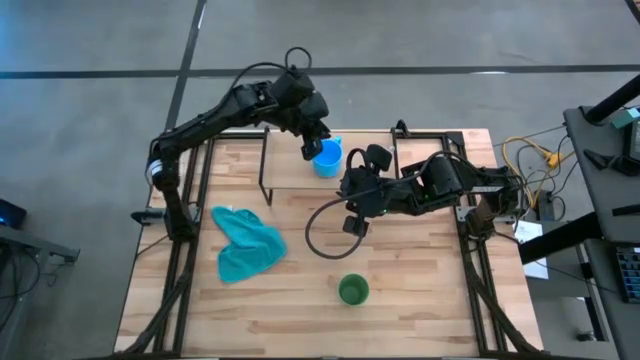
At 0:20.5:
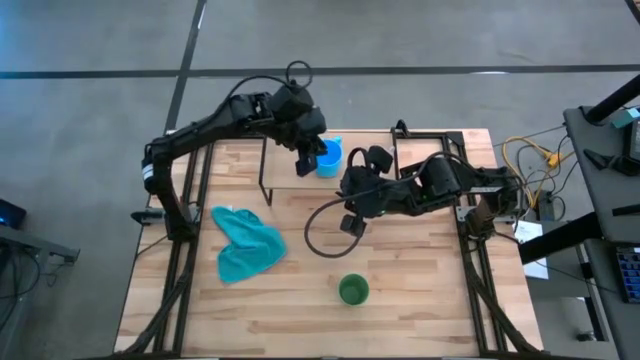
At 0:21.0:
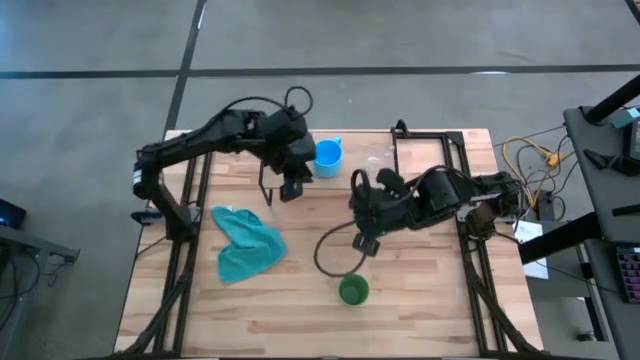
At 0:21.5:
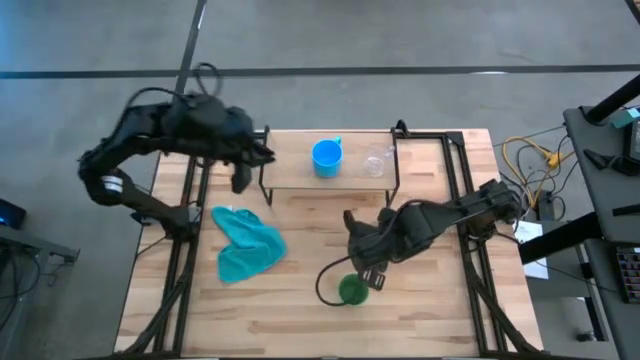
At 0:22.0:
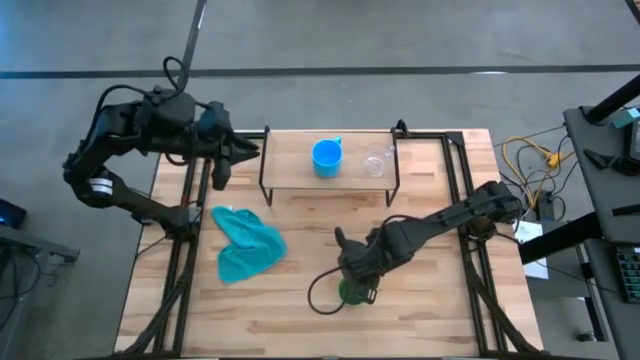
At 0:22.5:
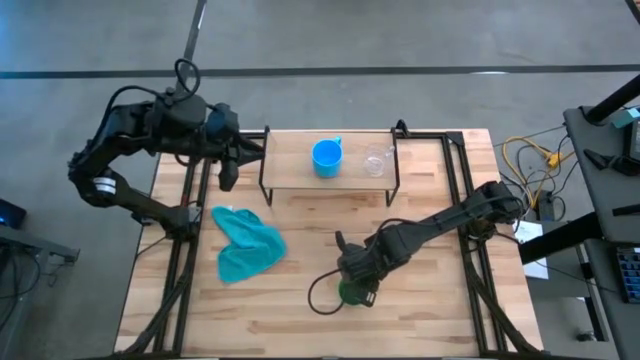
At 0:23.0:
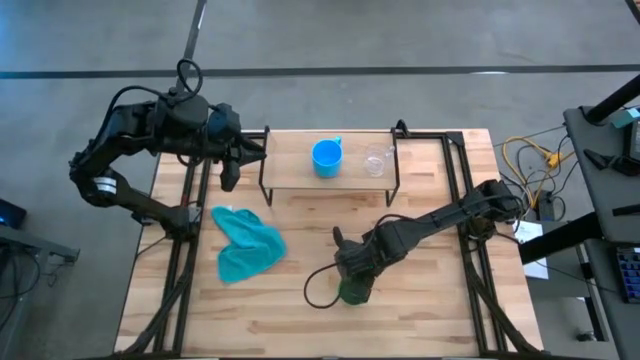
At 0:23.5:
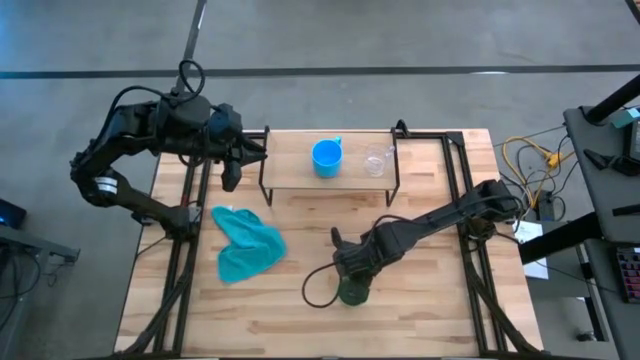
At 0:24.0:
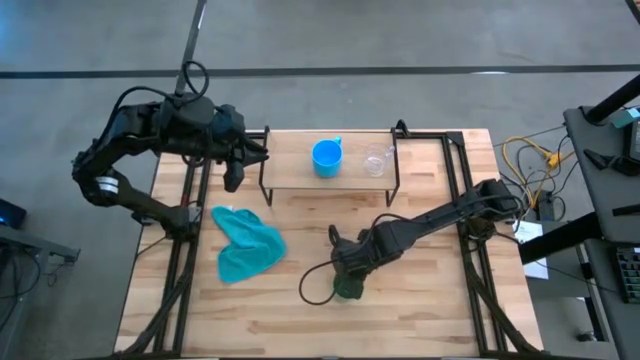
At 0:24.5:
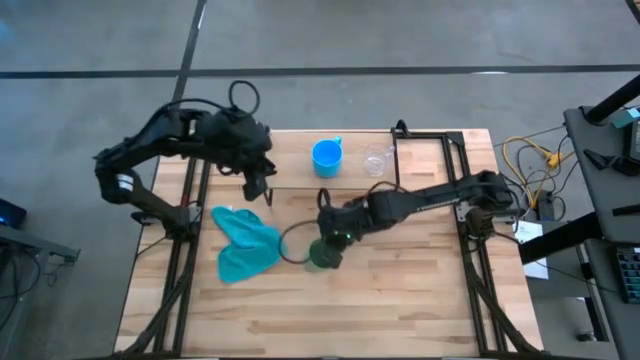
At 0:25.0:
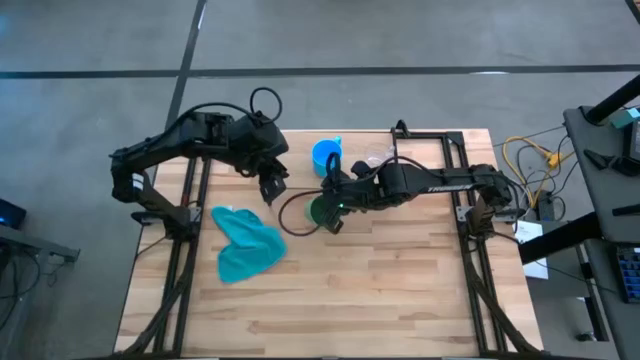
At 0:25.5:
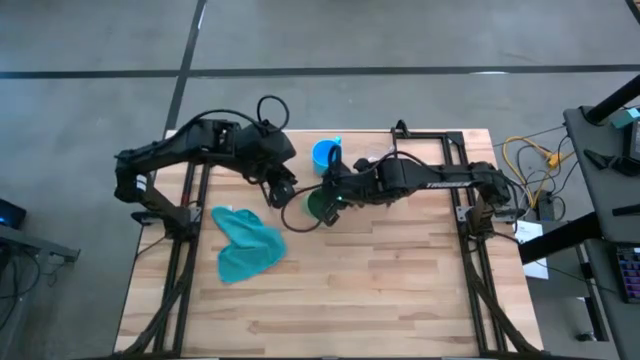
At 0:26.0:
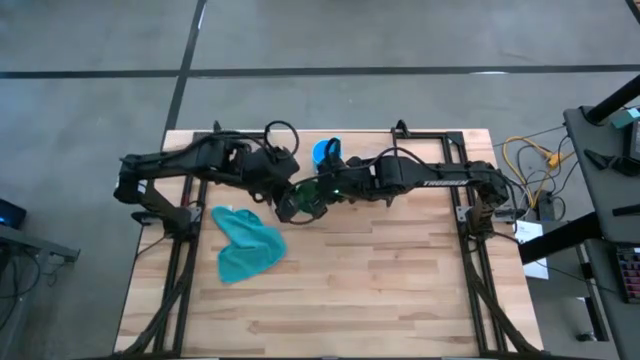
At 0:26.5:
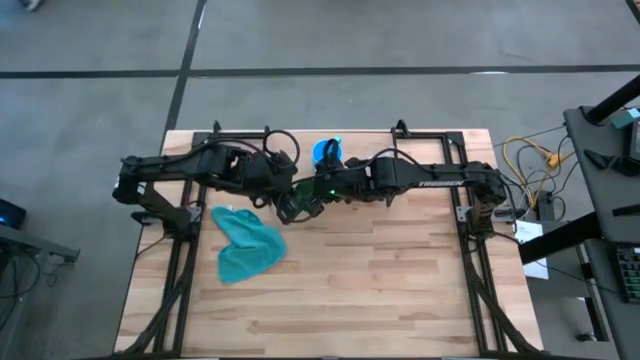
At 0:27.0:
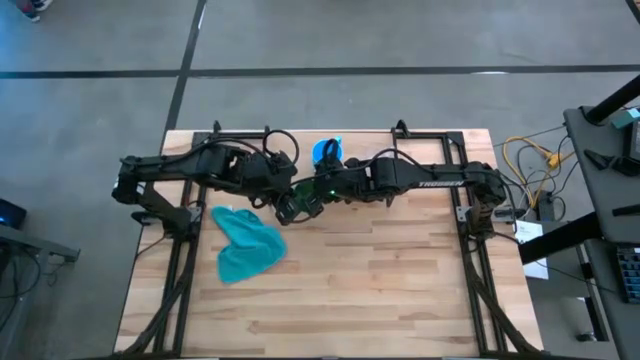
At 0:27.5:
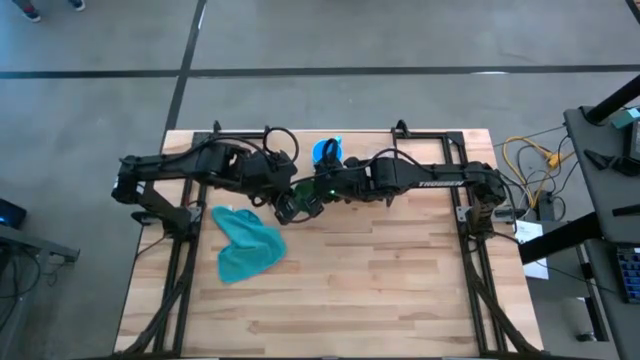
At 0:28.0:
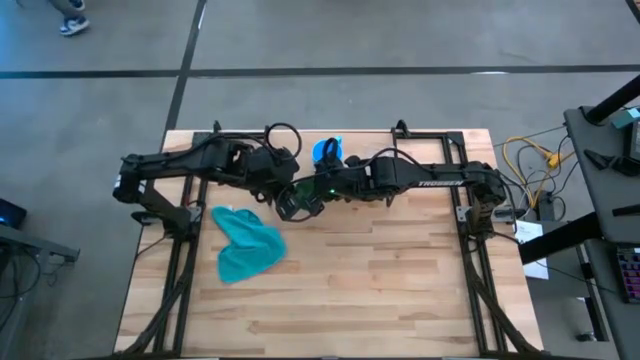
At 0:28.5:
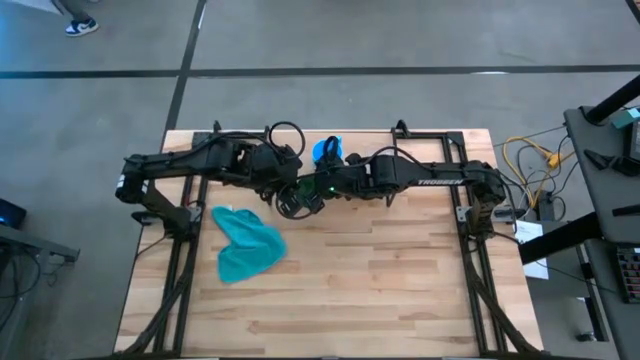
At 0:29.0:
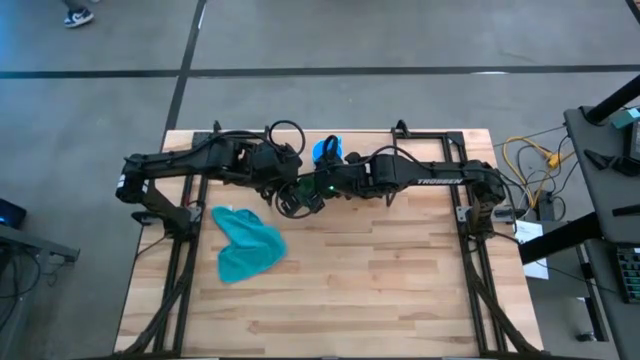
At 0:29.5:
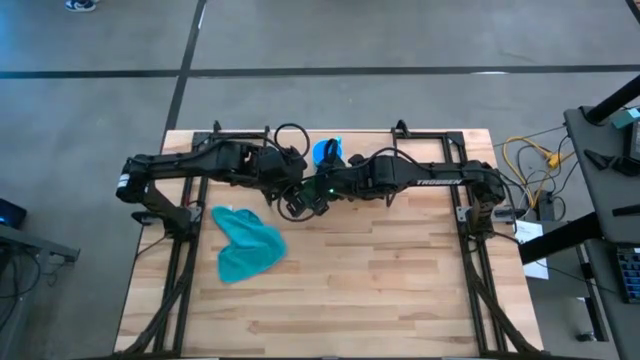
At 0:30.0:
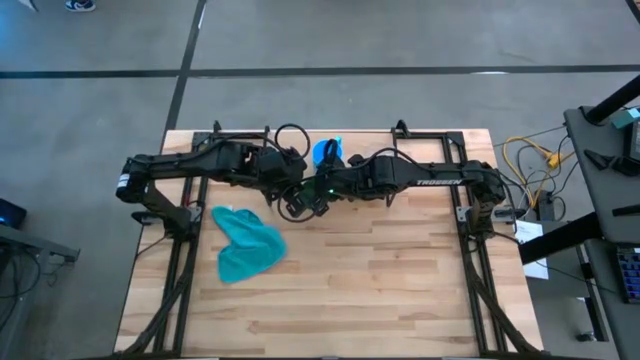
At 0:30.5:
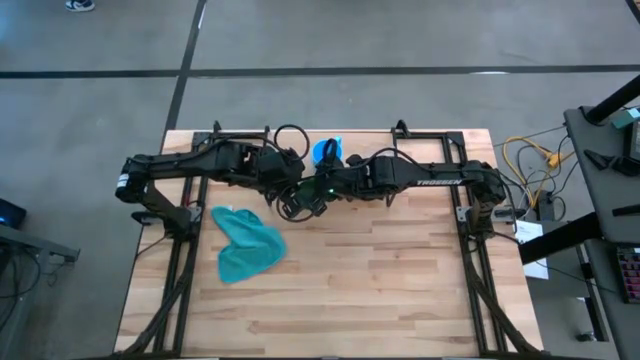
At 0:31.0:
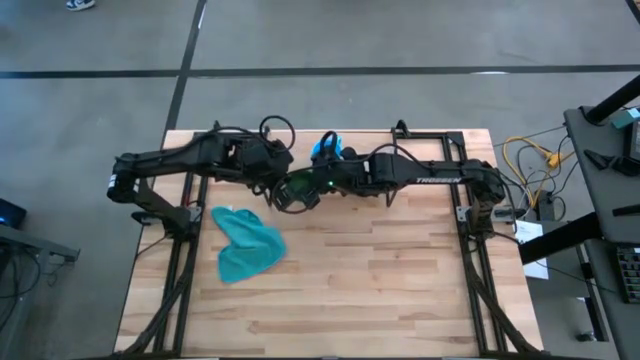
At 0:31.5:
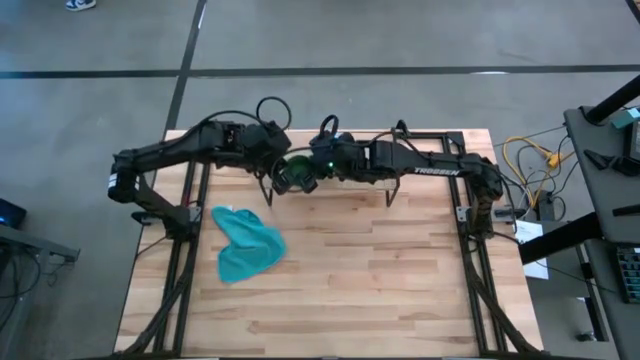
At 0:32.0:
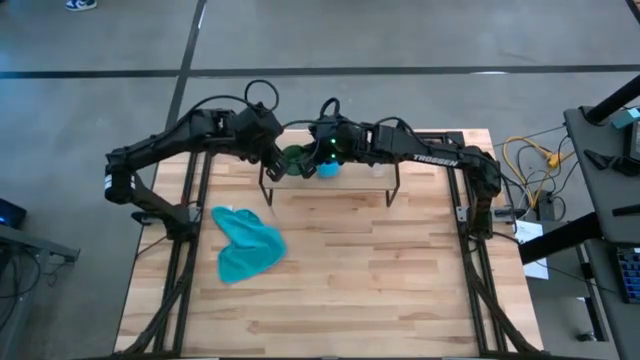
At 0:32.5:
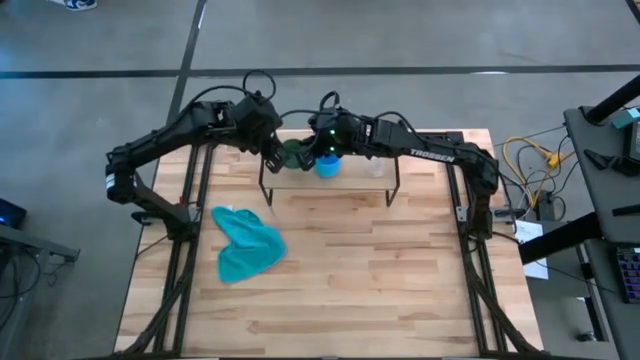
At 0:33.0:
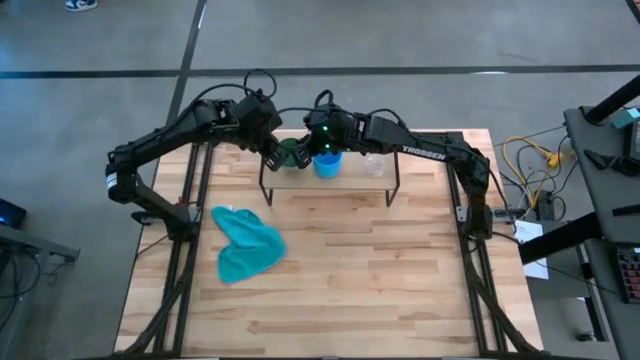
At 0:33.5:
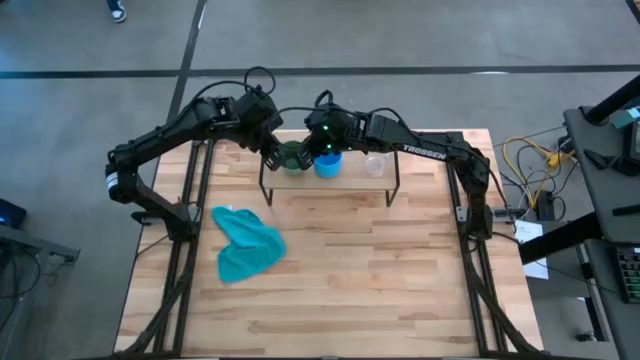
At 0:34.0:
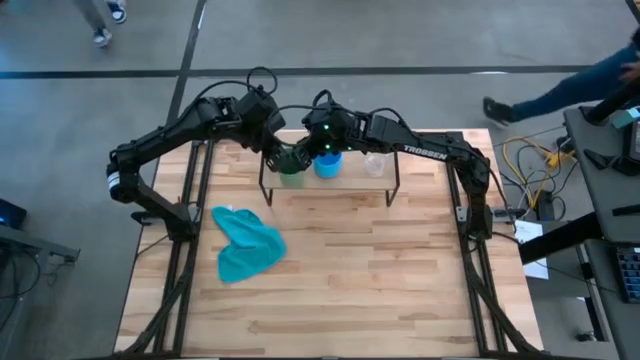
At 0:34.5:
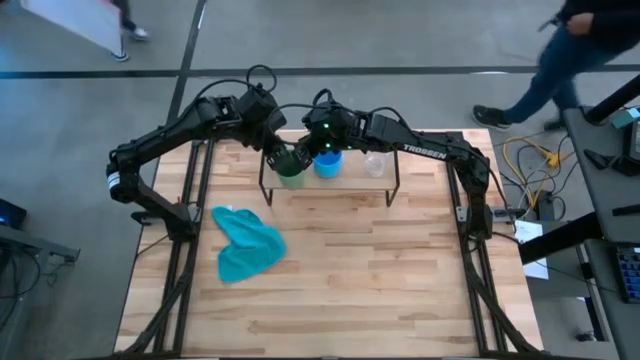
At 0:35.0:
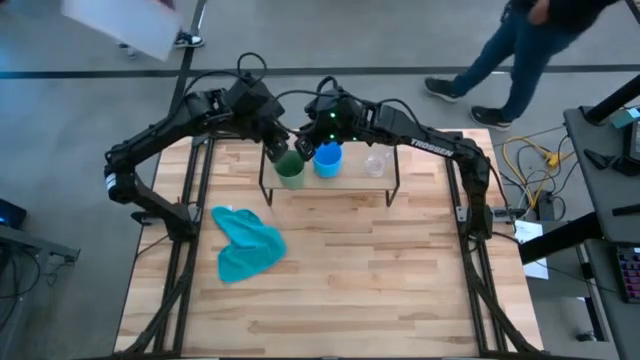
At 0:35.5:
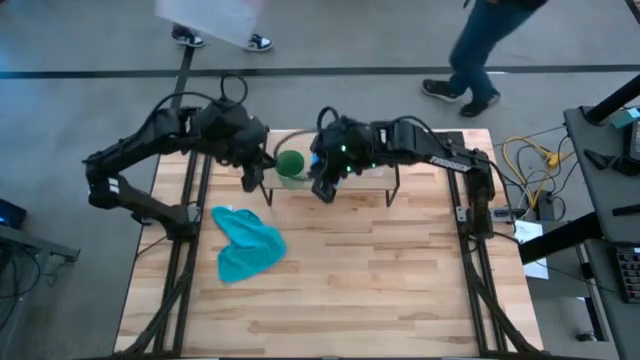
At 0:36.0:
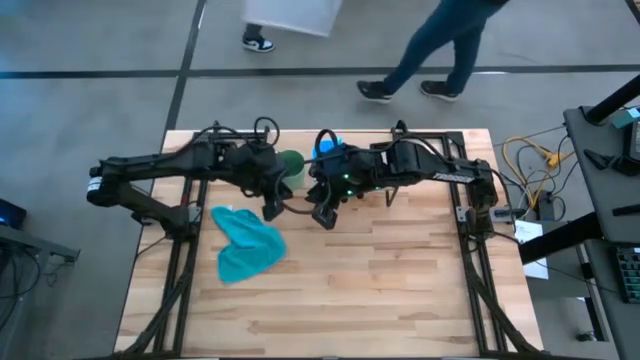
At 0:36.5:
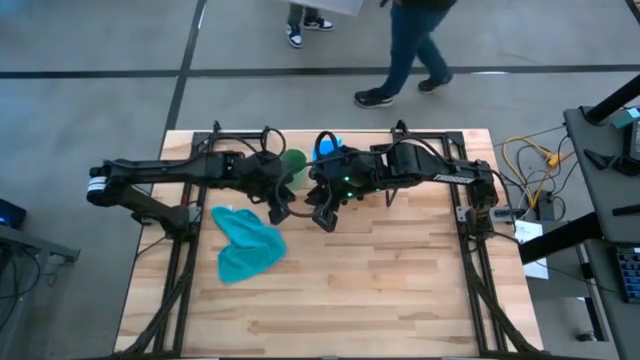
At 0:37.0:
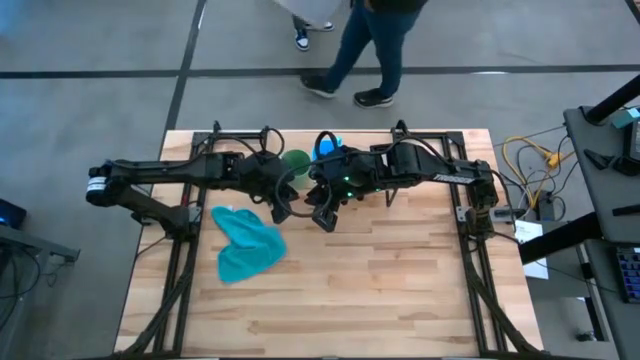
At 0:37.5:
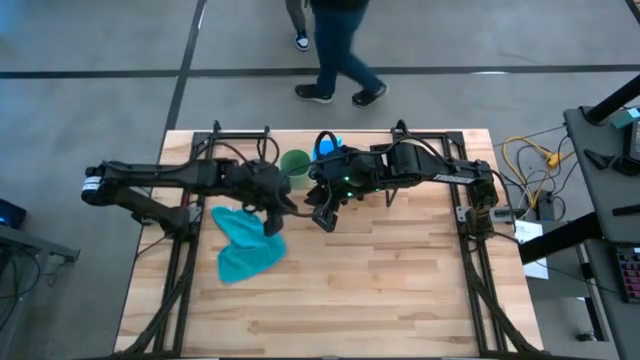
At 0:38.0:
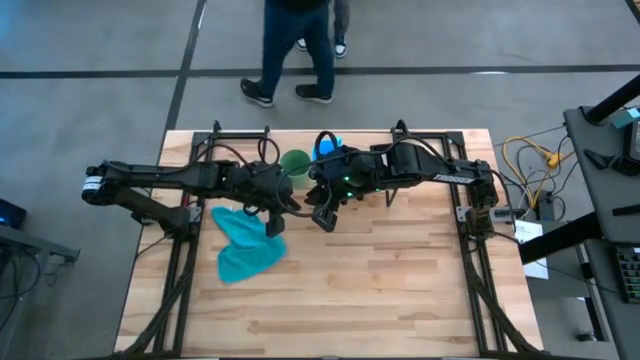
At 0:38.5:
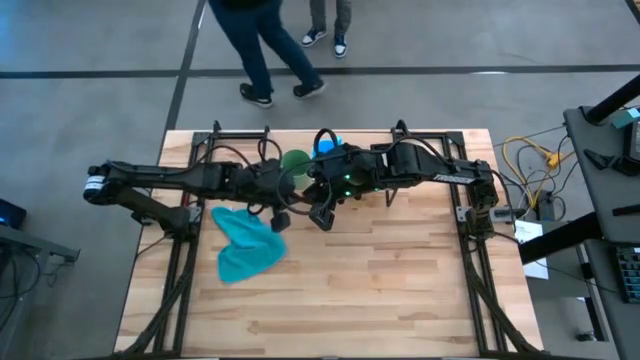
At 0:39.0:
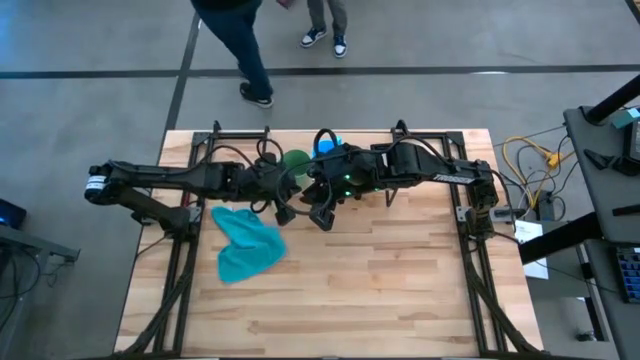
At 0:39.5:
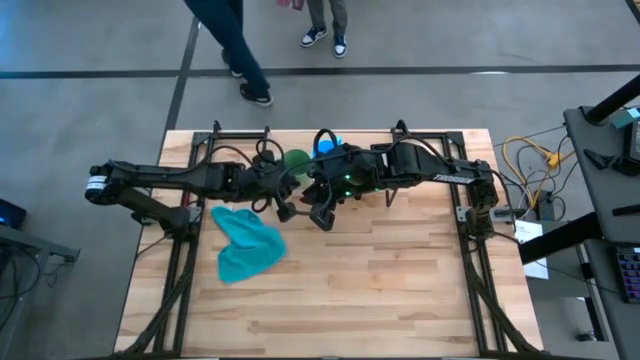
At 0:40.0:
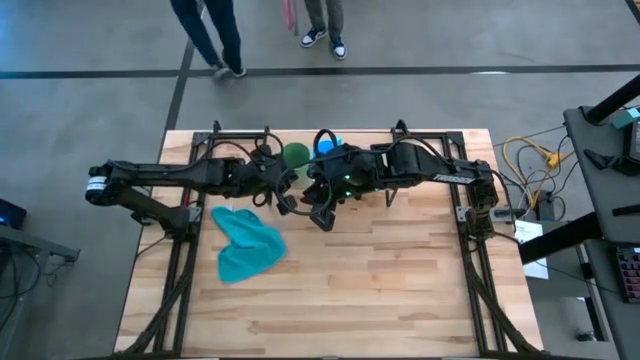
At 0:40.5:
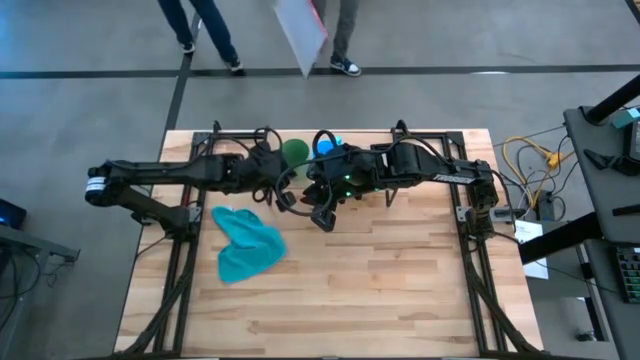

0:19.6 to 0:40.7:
Task: Stack small to large cups/mugs on shelf
Put the green cup on the shelf

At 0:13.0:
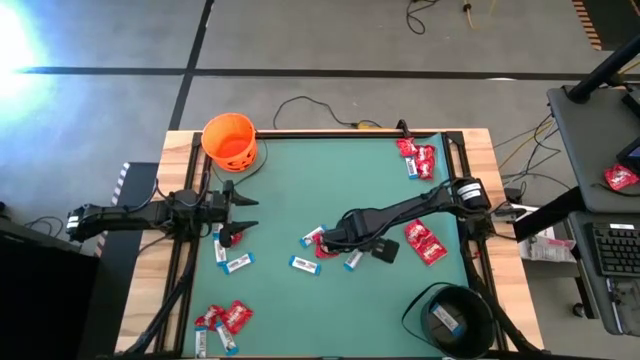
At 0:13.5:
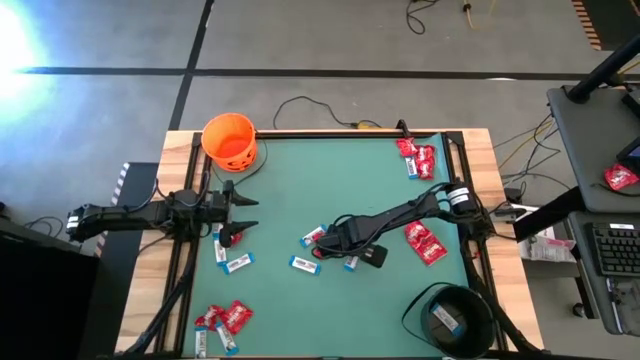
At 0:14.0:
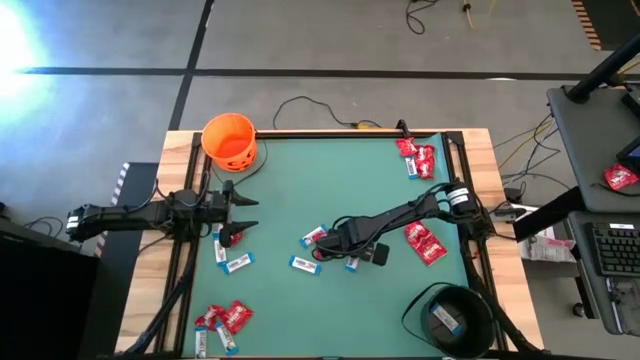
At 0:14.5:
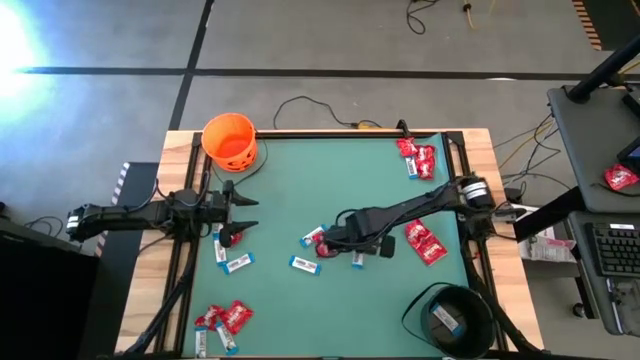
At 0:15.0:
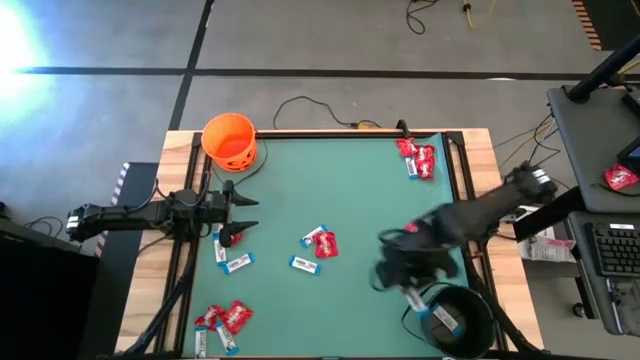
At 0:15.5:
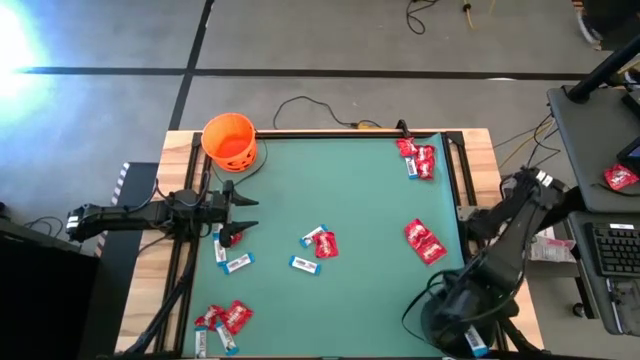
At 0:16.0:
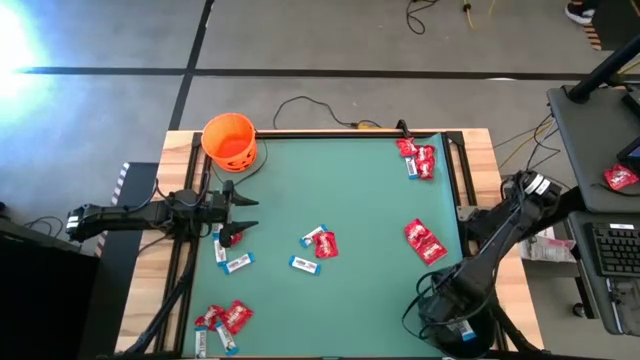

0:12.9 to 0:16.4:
Task: Sort candy by brand, put in halloween buckets
Put the white chocolate into the black bucket
